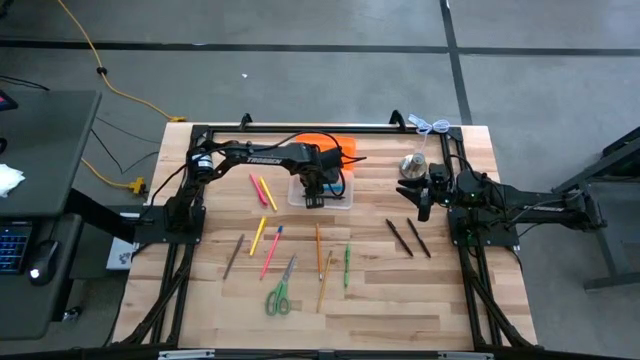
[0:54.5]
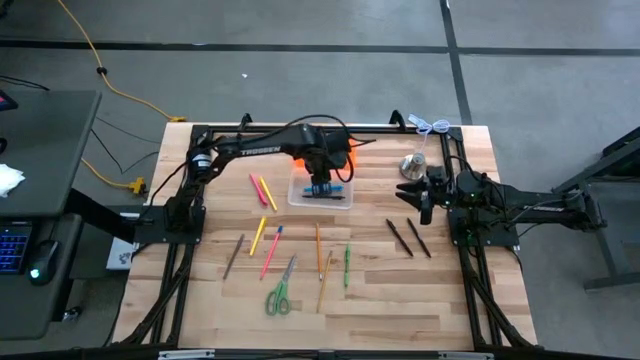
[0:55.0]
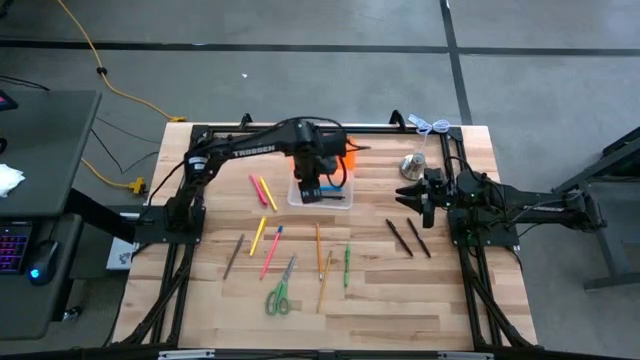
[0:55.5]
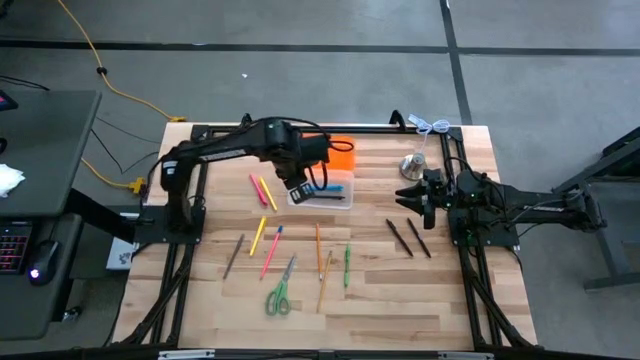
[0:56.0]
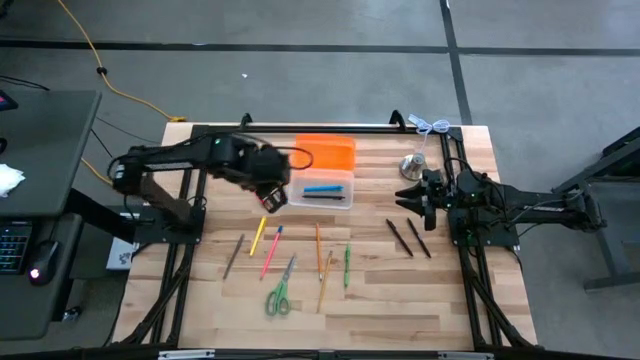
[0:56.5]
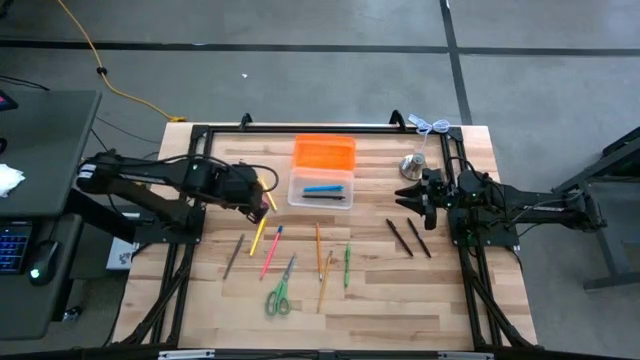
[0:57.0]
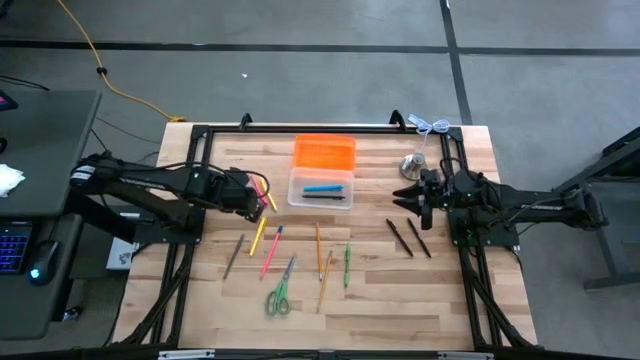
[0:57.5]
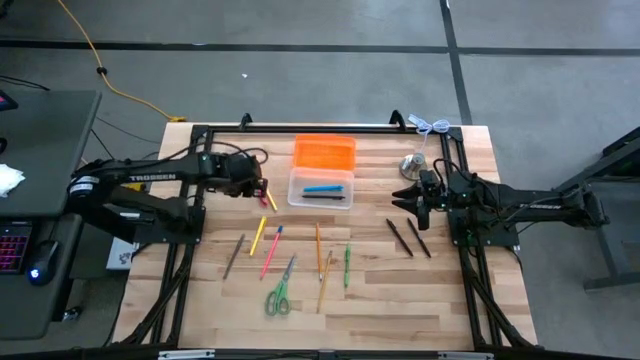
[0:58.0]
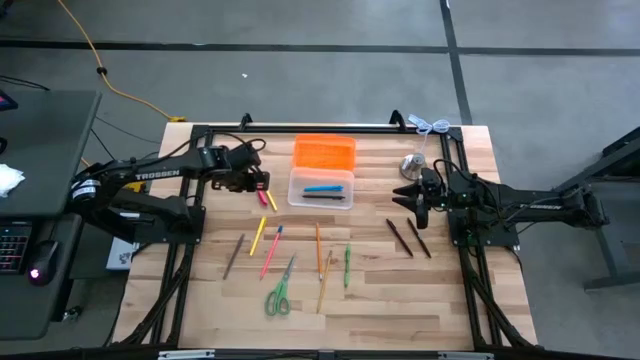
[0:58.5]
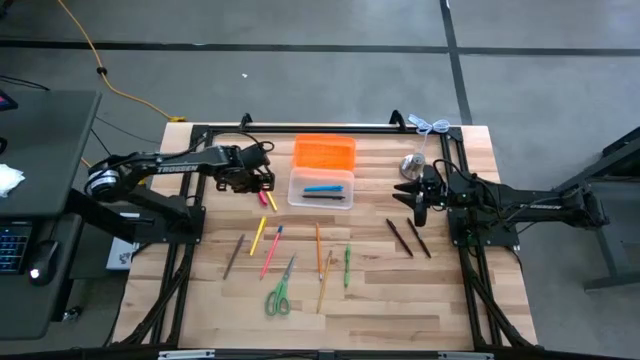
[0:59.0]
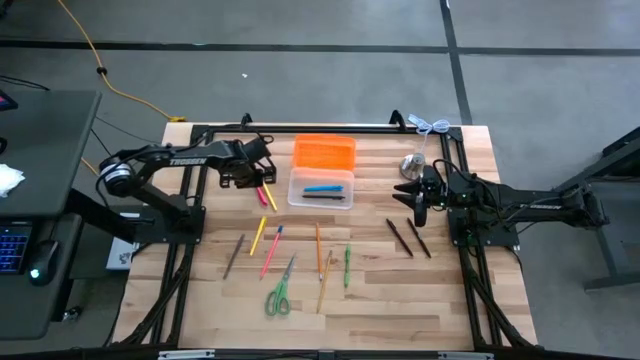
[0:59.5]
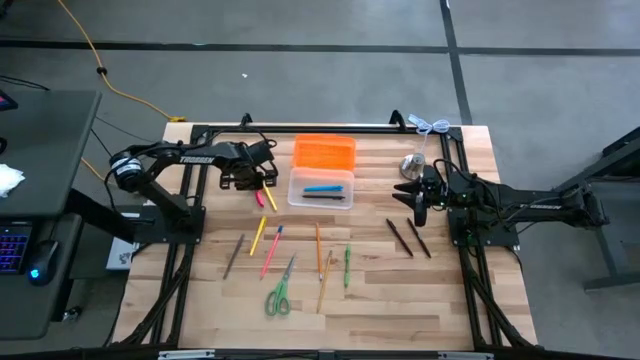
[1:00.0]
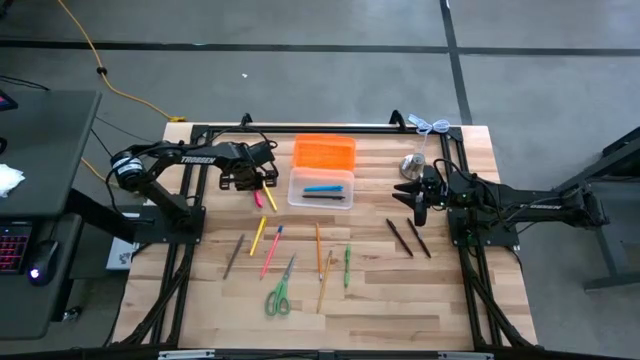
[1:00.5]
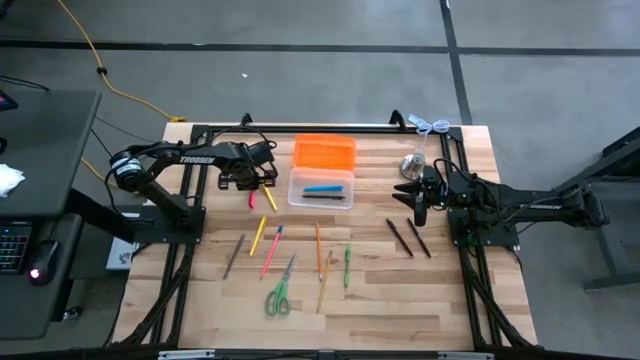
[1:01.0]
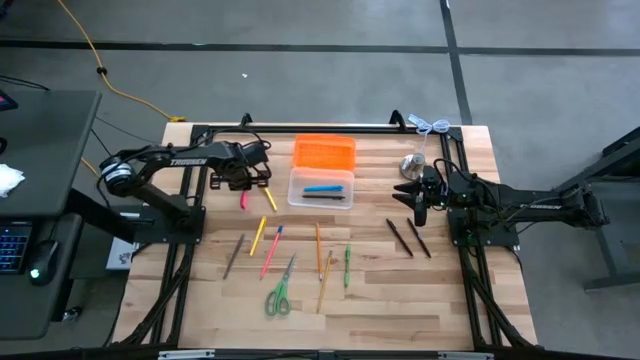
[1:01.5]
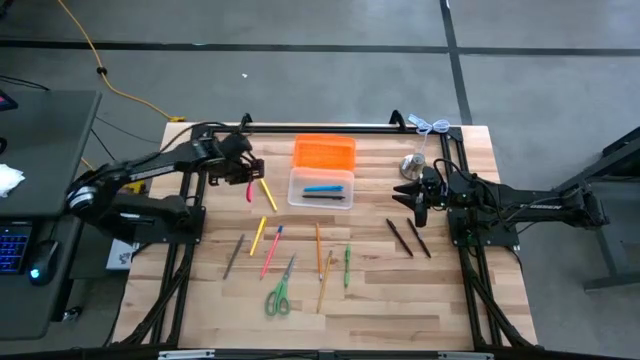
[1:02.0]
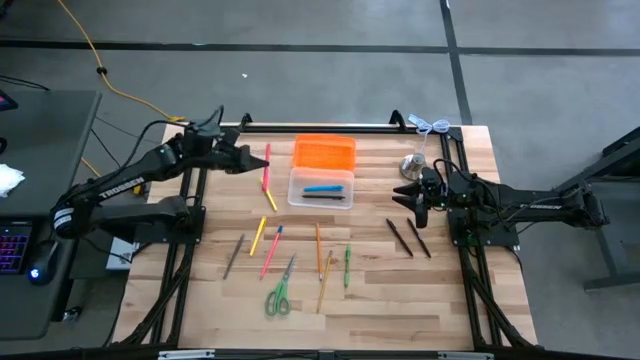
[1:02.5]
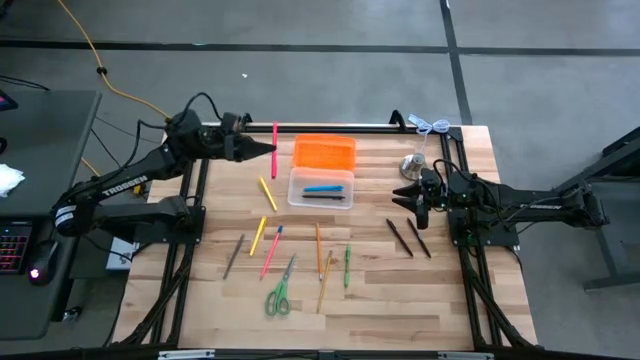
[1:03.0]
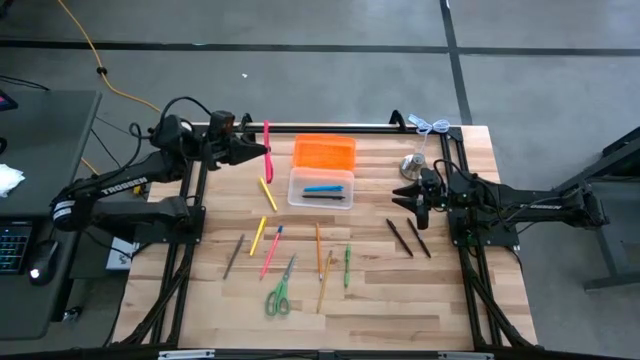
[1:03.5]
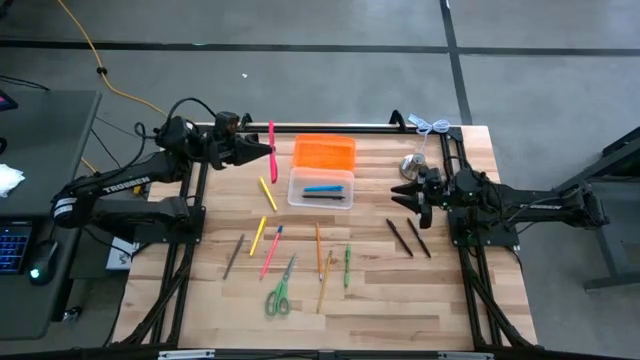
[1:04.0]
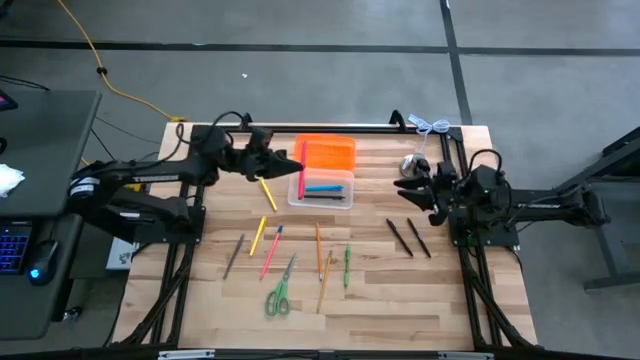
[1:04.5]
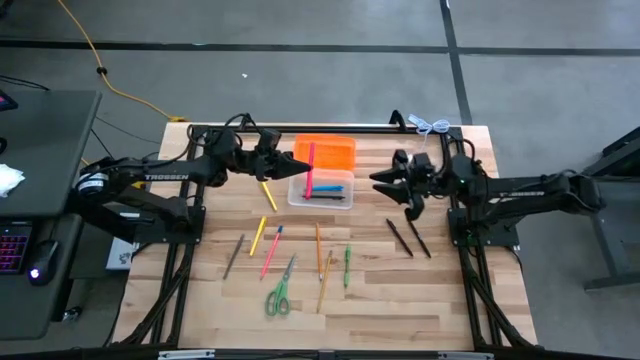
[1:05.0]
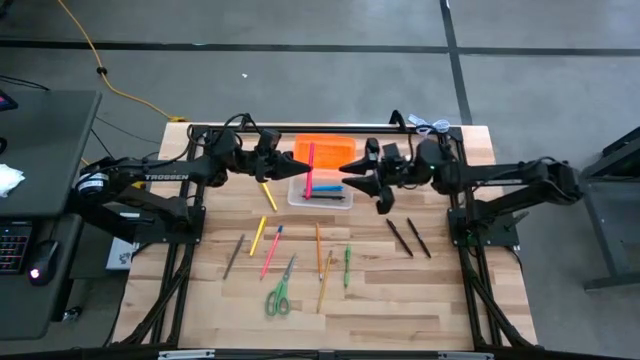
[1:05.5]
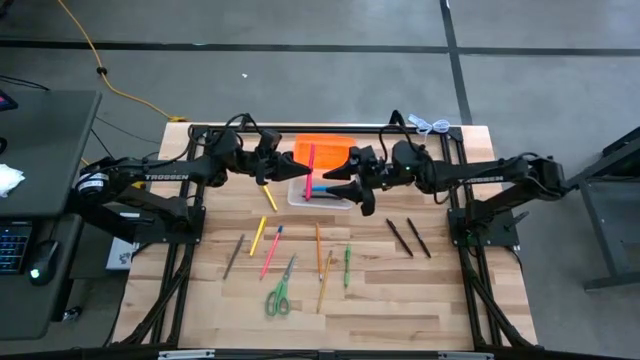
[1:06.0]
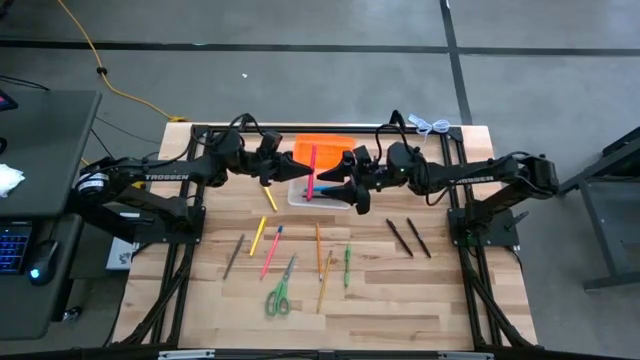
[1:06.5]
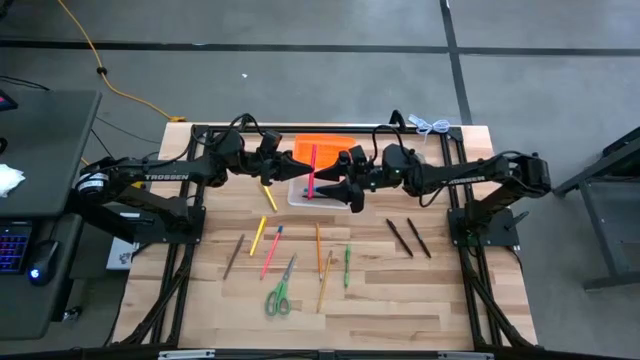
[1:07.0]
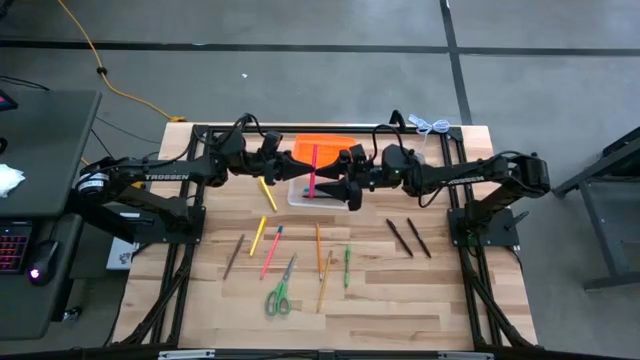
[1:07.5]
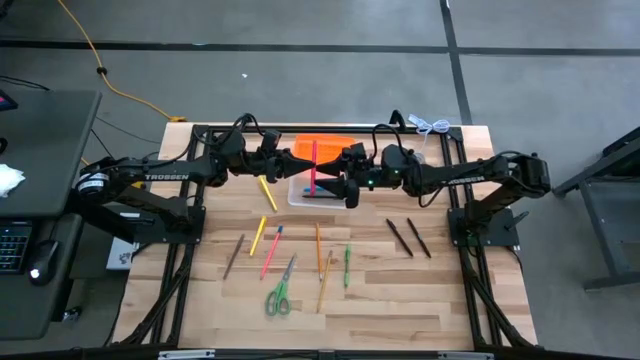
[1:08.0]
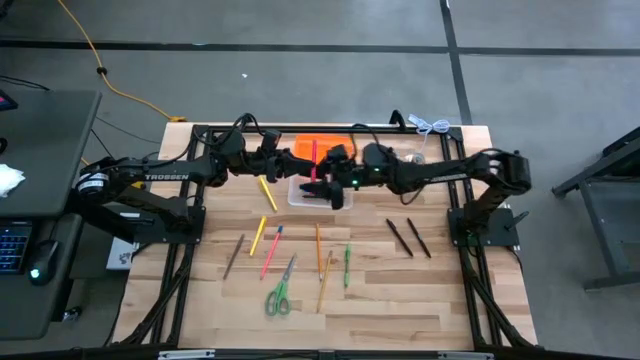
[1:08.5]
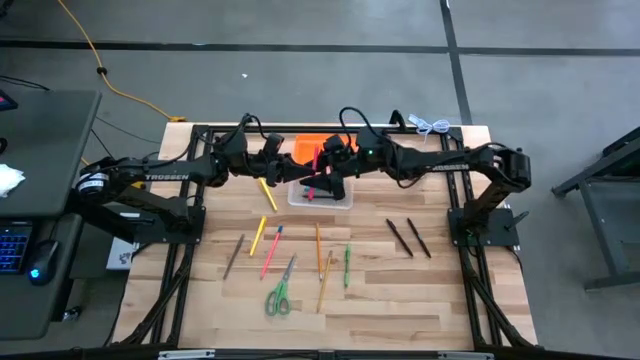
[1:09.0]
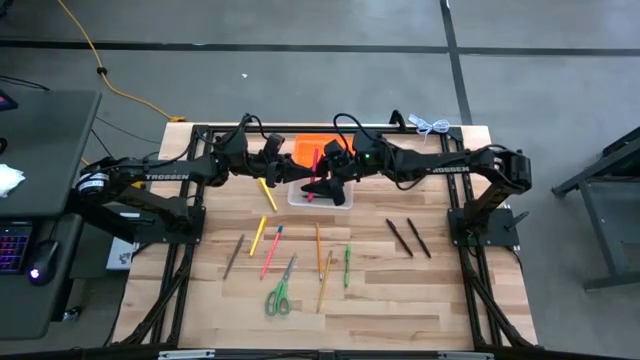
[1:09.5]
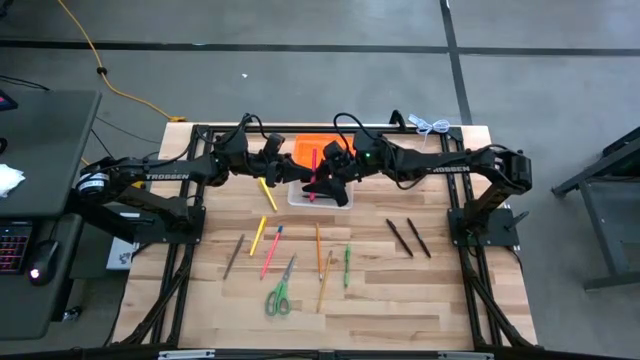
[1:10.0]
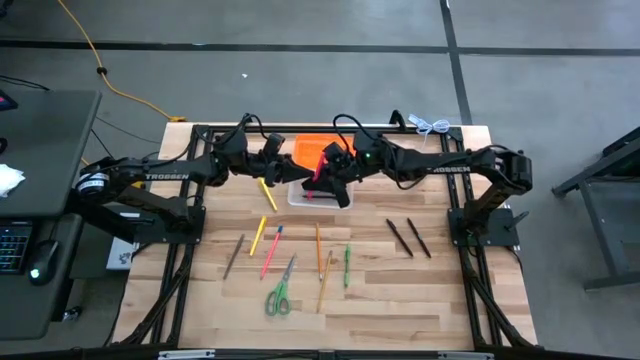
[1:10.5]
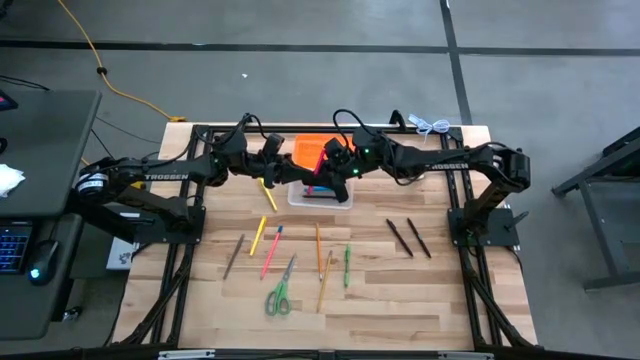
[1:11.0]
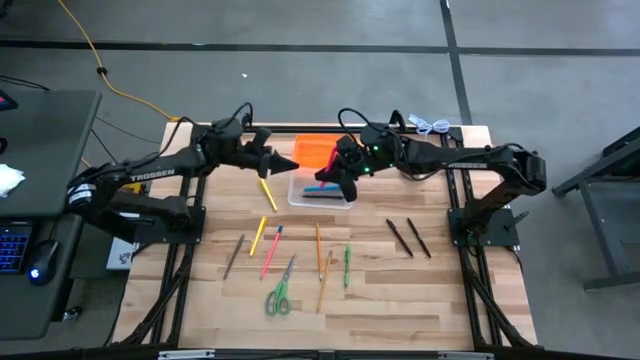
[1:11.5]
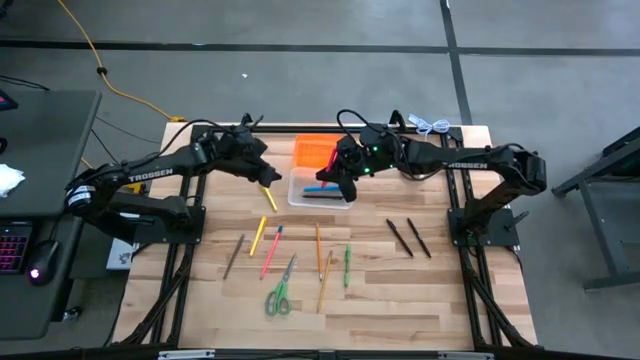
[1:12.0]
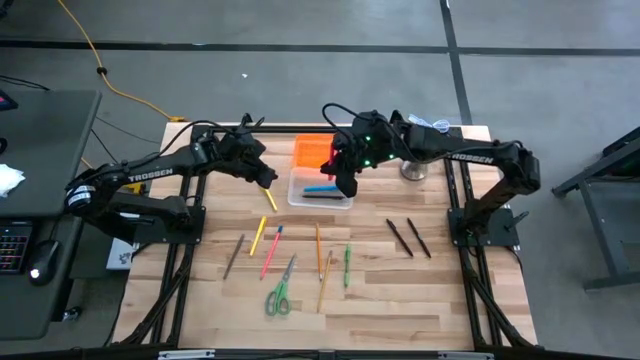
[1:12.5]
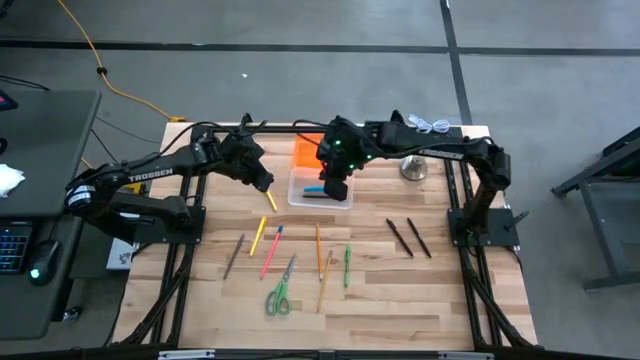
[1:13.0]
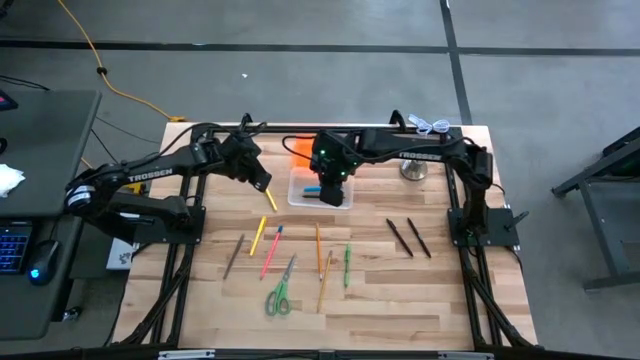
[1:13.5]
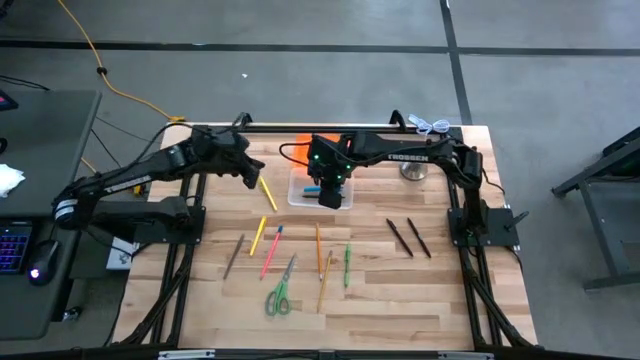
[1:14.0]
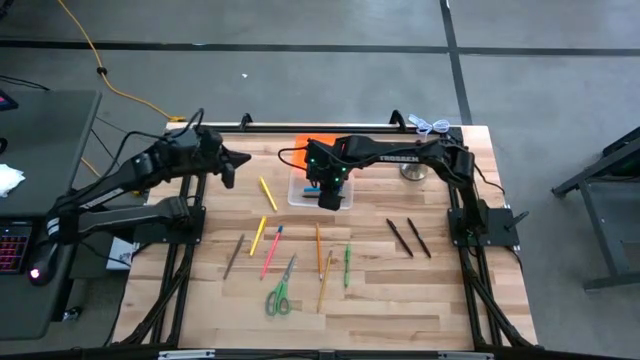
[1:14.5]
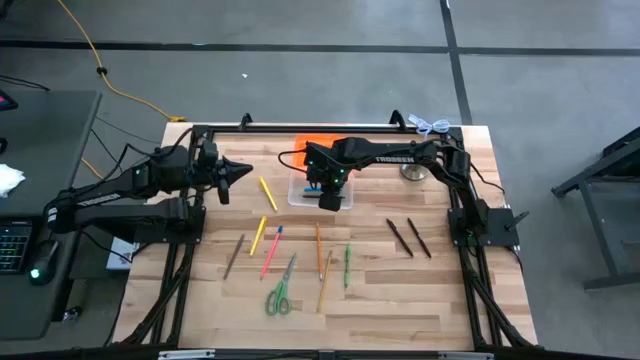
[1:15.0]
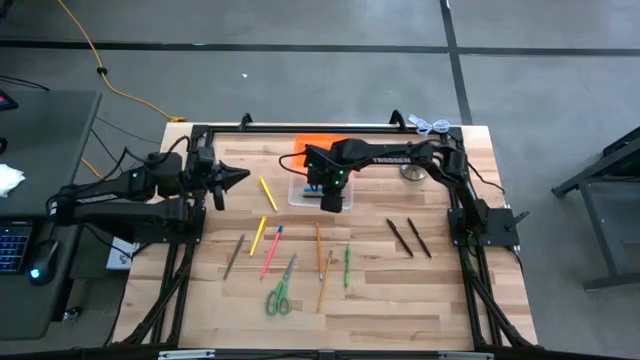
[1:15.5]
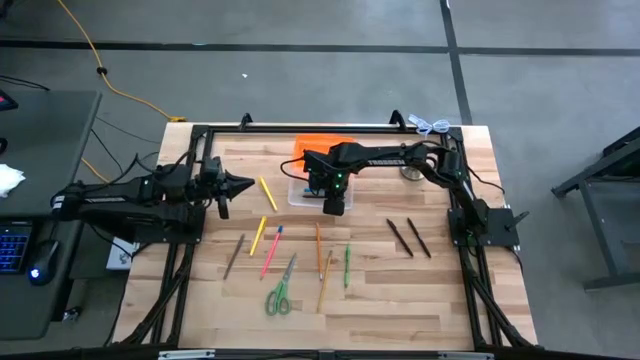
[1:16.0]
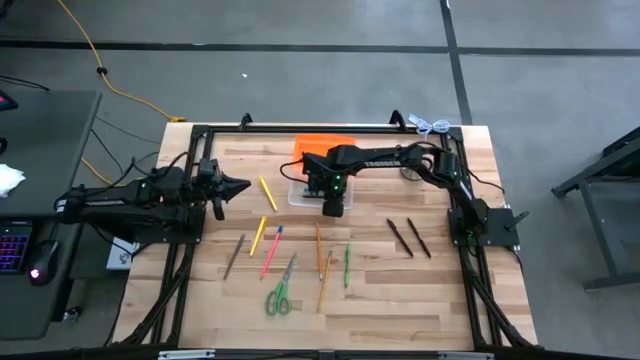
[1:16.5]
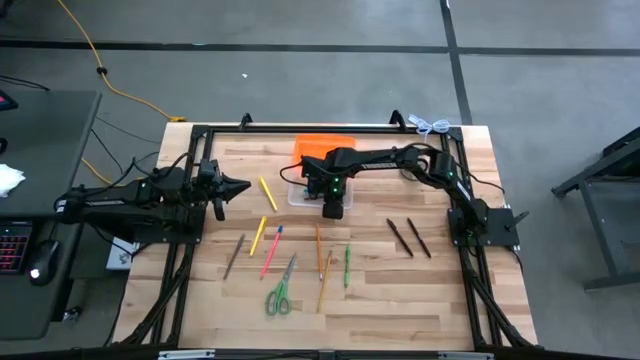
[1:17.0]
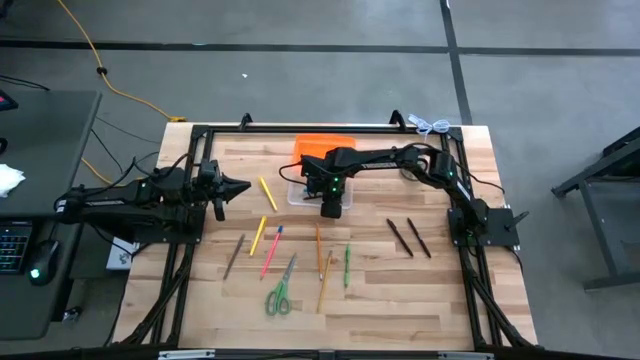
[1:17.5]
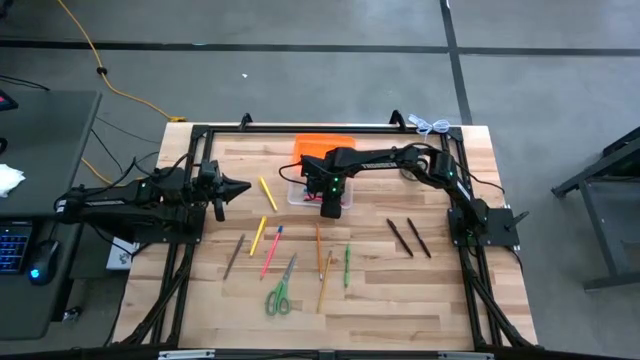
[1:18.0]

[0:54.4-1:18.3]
Task: Pick & place school supplies into a supply box
Put the pink pen into the transparent supply box
